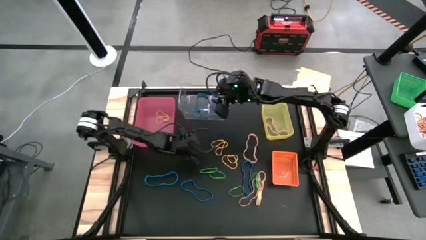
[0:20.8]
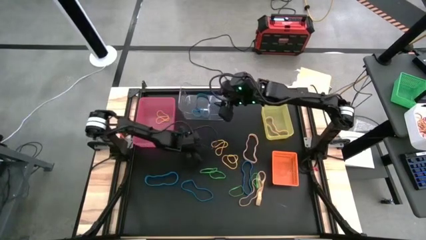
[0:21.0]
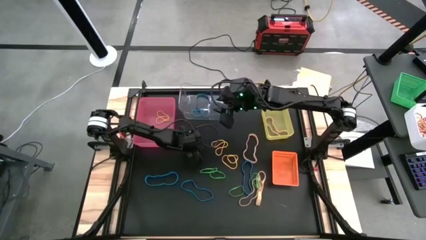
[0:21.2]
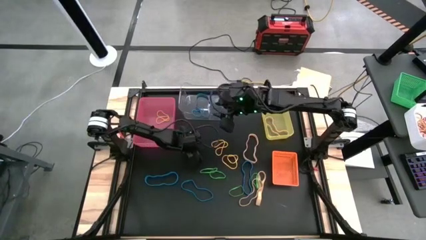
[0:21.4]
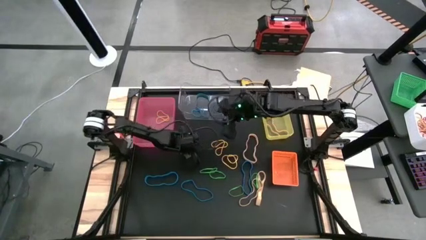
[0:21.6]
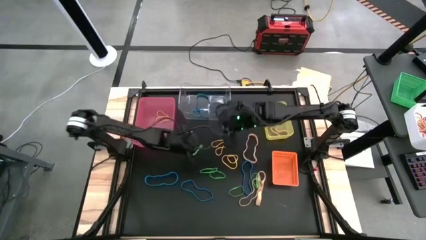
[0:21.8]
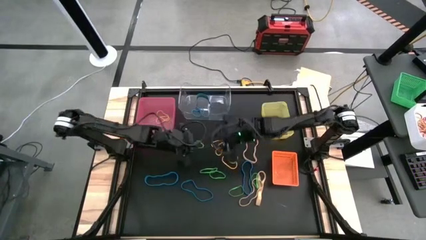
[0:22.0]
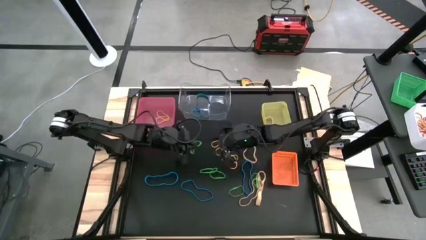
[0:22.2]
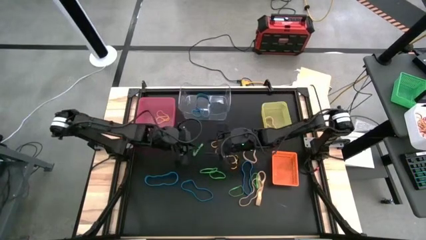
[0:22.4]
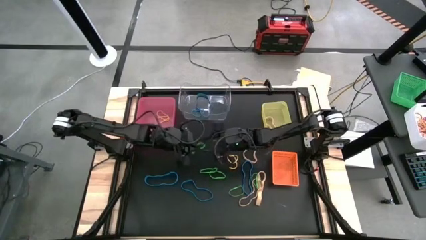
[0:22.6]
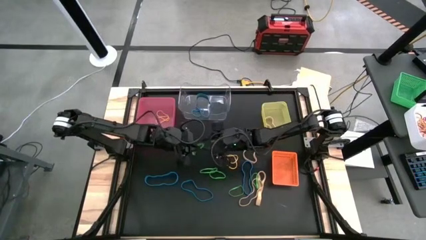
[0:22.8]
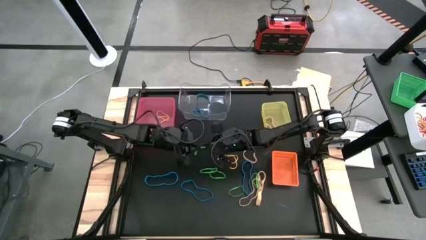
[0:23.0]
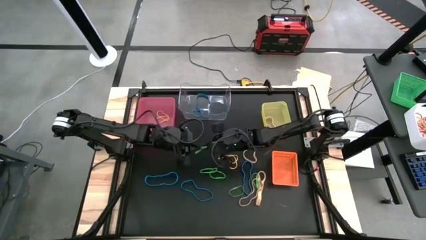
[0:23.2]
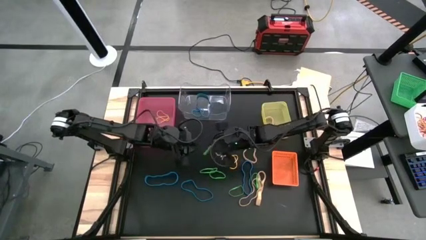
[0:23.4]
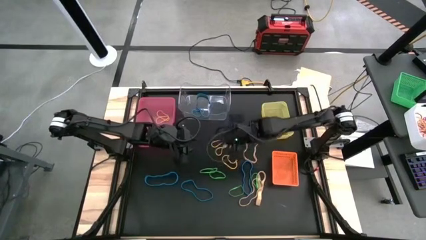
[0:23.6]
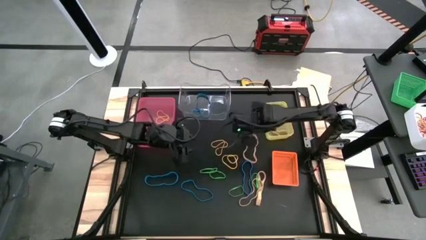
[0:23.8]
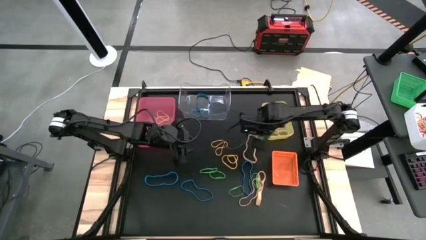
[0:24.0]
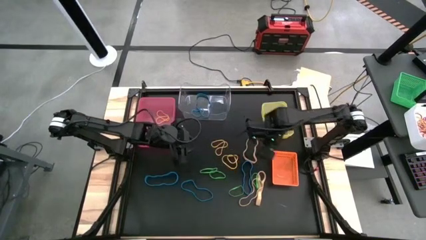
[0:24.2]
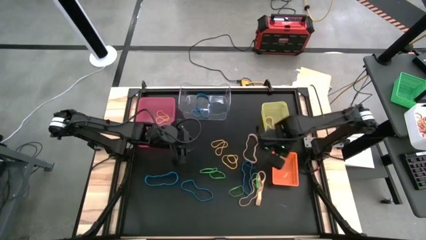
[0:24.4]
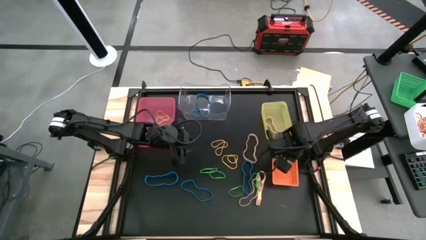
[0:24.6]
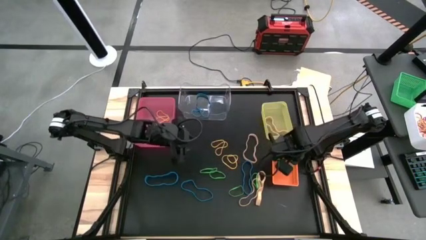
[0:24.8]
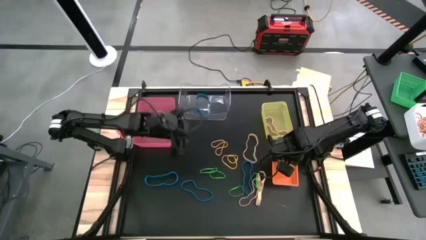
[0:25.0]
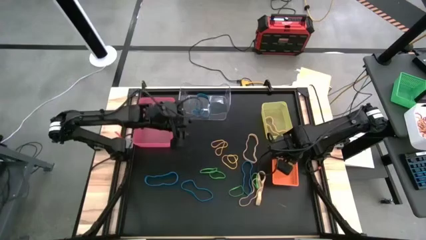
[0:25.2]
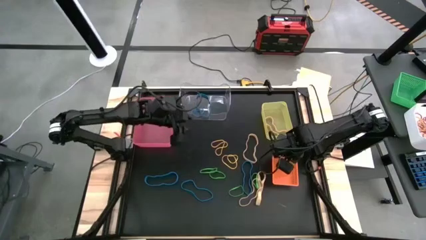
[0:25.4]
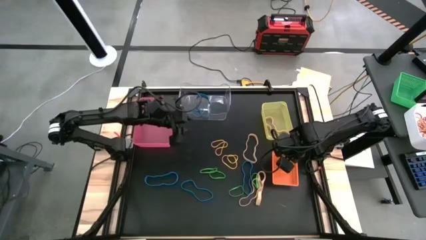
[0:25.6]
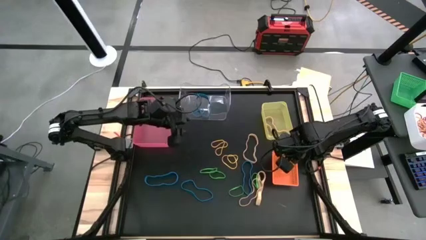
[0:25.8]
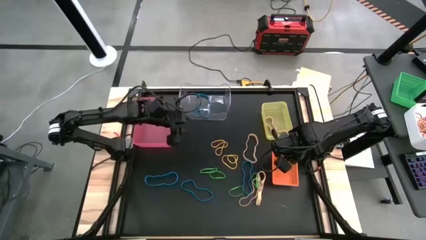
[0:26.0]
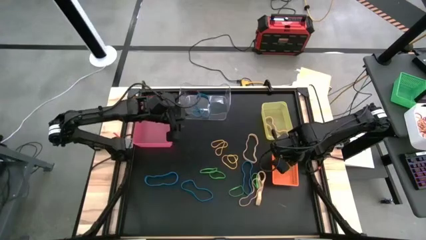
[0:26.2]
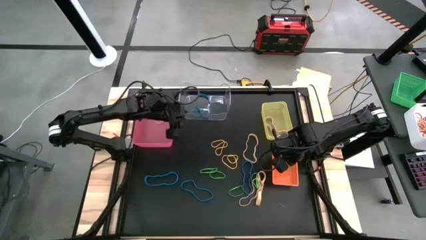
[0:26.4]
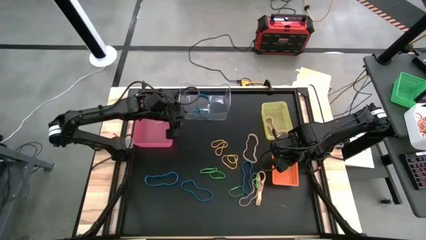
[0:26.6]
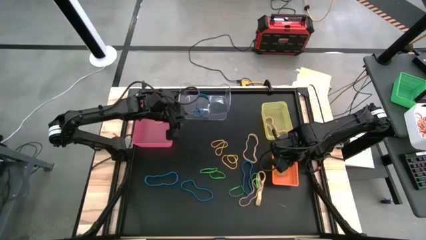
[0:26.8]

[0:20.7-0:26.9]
Task: Sort rubber bands into baskets
Put the green rubber band into the orange bin

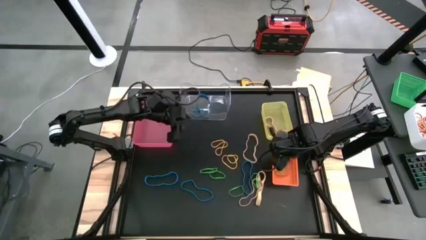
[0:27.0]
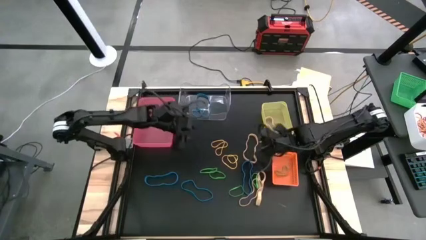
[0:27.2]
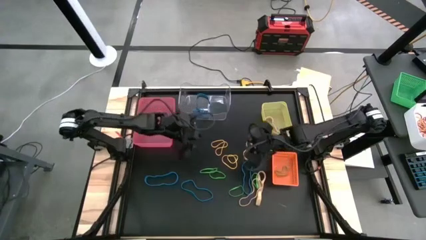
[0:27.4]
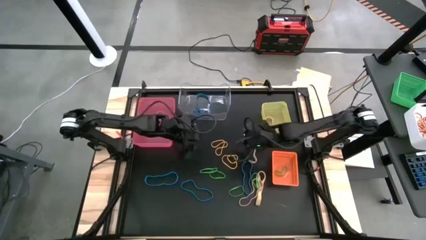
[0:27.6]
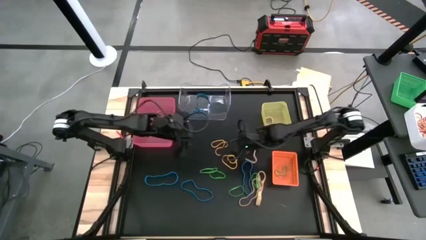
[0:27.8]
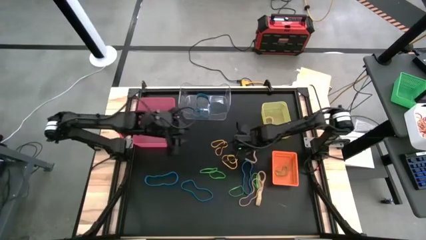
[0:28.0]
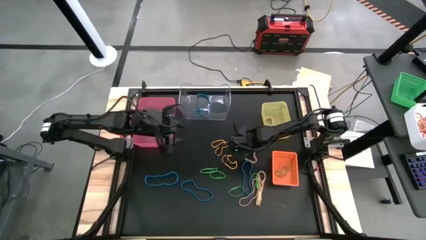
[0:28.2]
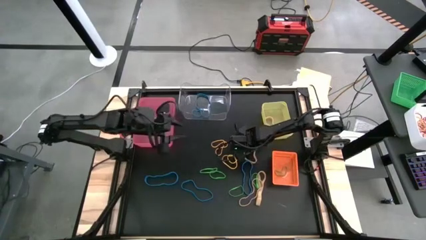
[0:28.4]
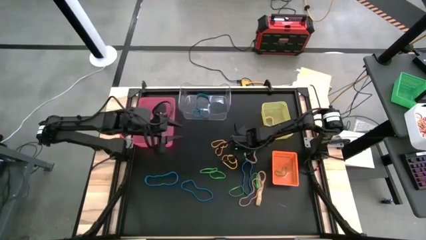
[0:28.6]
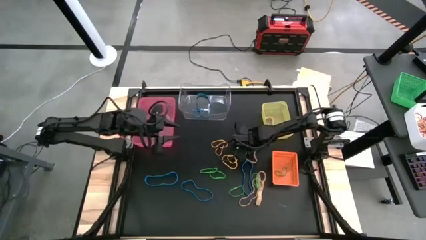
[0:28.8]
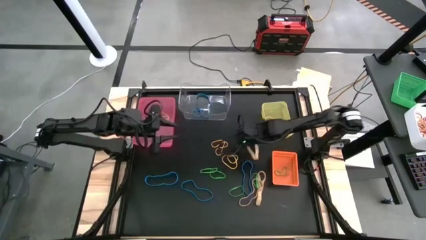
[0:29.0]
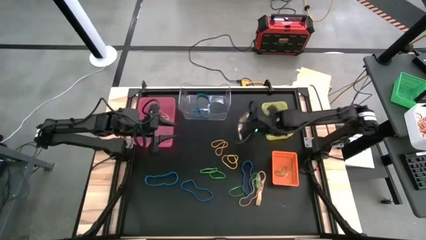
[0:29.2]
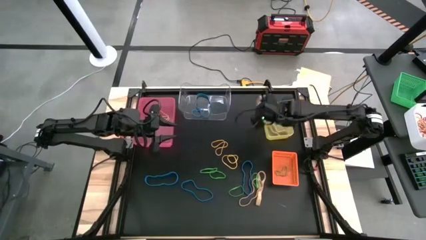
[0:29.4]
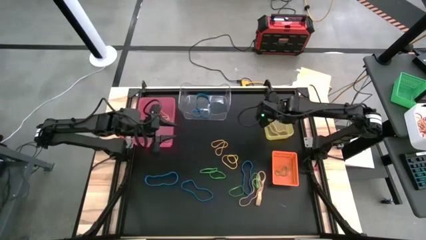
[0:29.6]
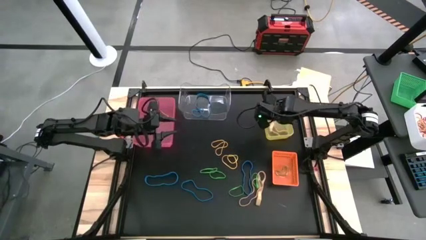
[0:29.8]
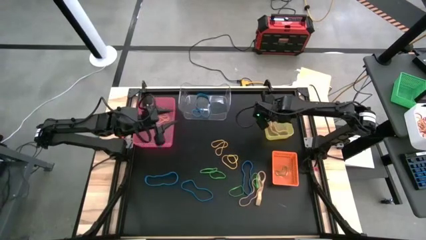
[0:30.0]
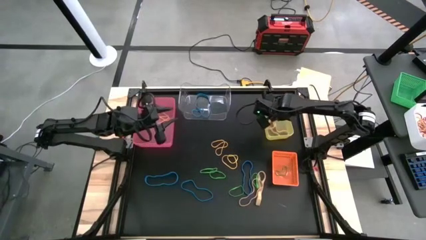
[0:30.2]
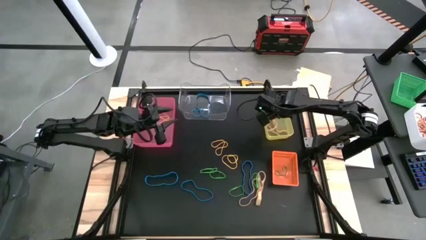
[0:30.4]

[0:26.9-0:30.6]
Put the light orange rubber band into the yellow bin

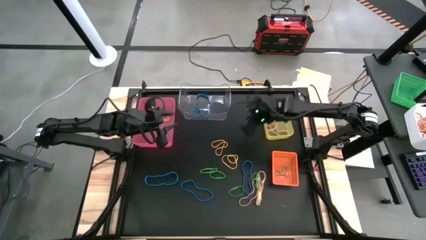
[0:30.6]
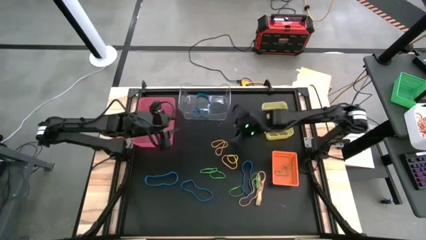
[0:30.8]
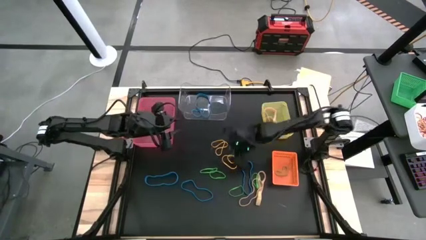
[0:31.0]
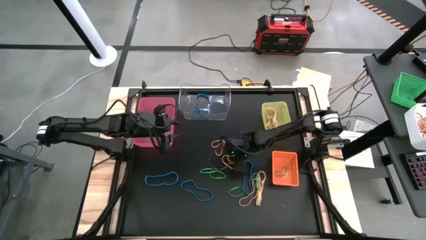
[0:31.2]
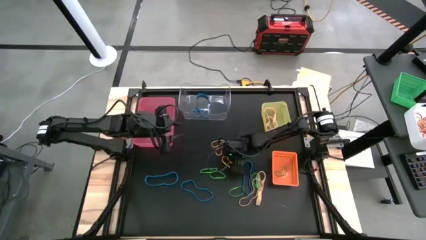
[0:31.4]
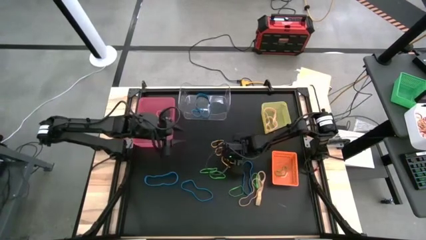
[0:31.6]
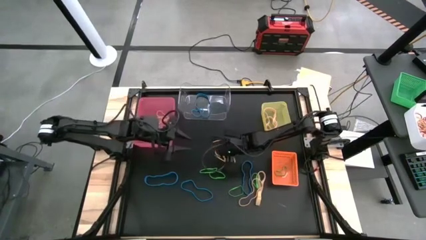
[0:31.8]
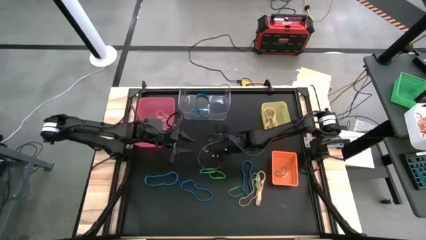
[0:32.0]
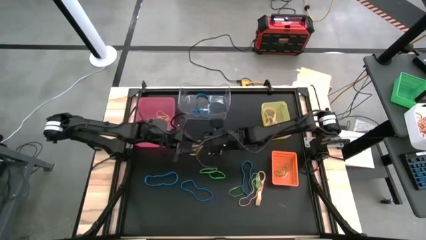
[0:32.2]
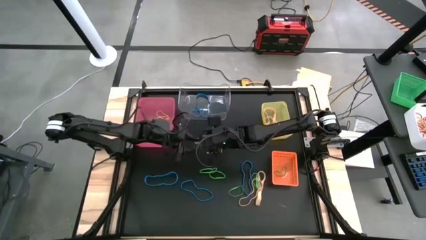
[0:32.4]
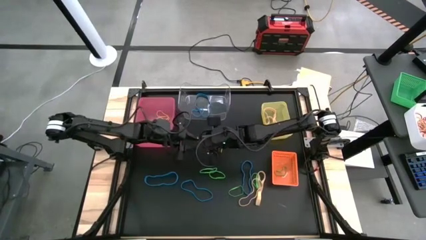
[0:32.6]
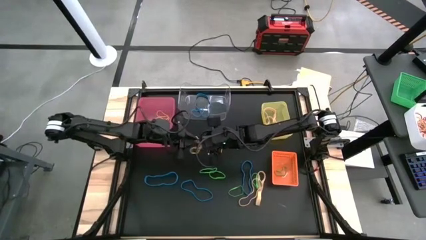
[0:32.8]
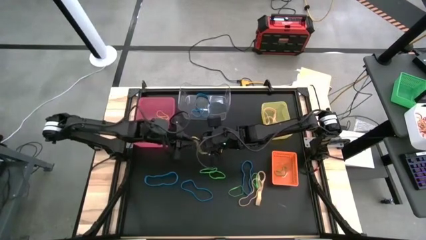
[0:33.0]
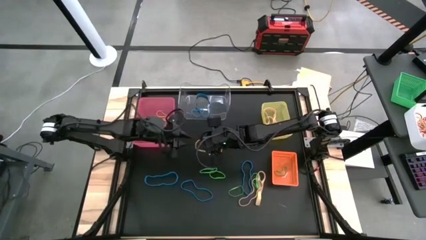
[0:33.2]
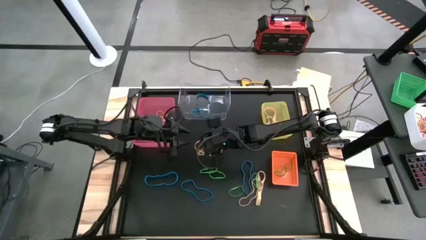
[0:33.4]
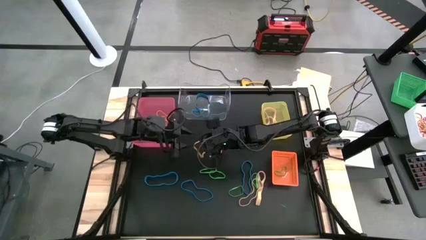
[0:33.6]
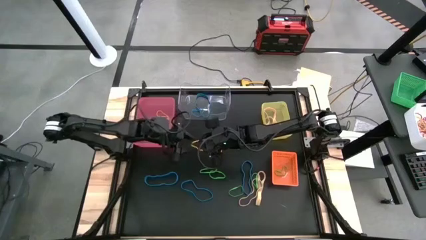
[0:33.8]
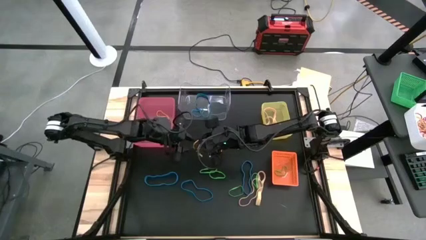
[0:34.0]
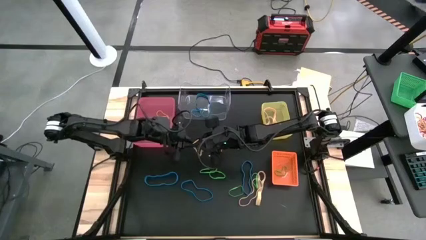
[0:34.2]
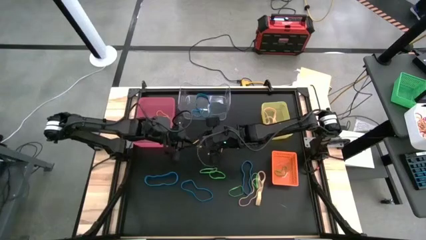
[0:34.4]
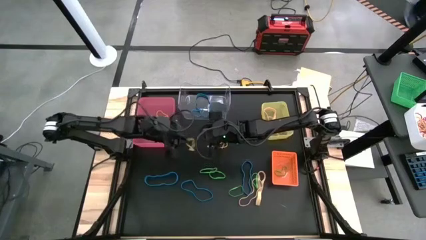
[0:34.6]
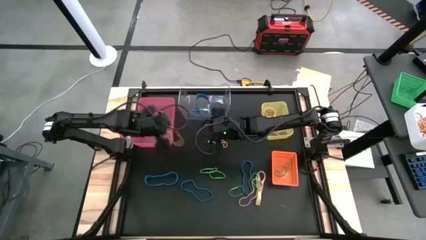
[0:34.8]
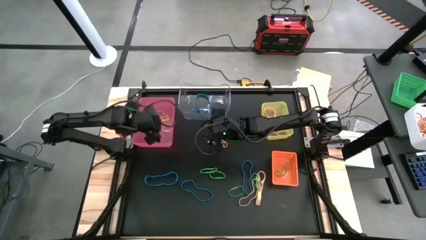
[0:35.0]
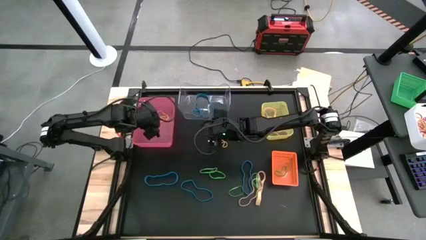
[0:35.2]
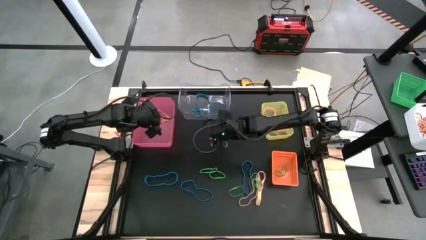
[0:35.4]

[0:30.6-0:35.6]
Put the yellow rubber band into the pink bin

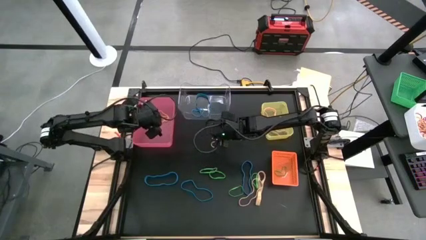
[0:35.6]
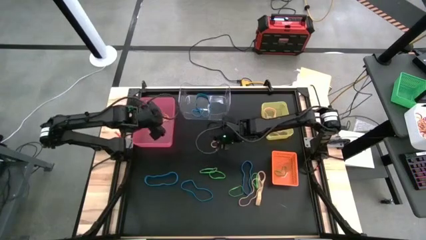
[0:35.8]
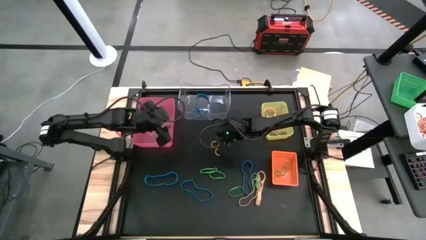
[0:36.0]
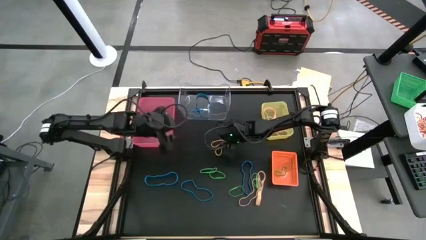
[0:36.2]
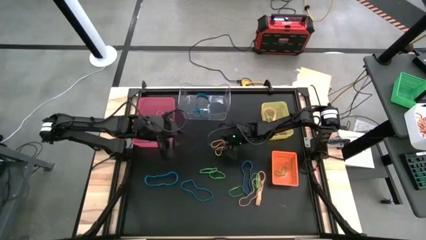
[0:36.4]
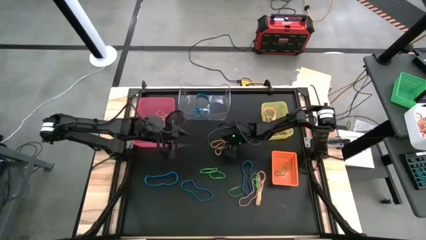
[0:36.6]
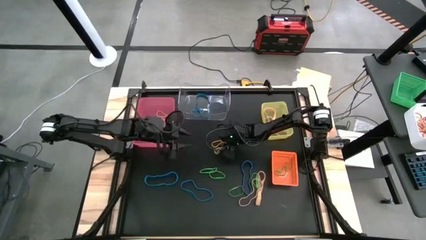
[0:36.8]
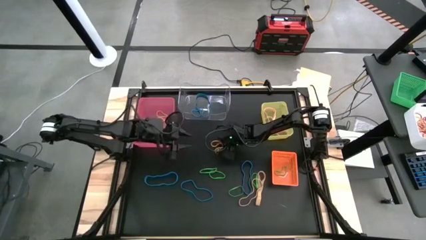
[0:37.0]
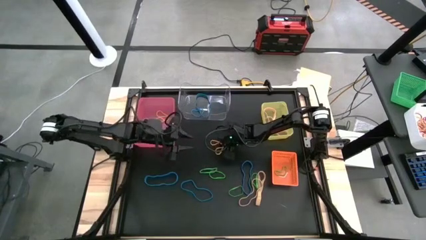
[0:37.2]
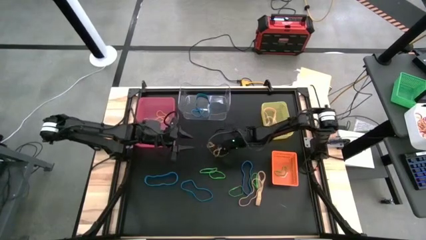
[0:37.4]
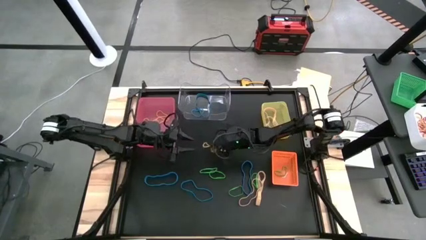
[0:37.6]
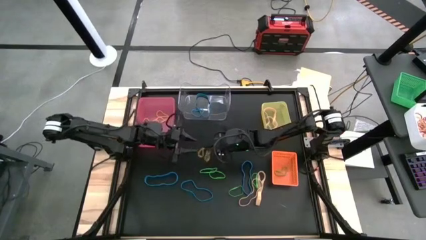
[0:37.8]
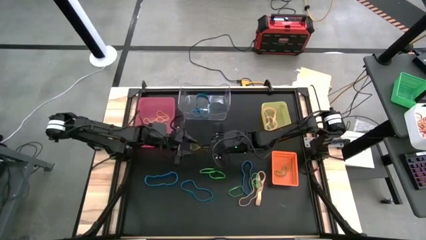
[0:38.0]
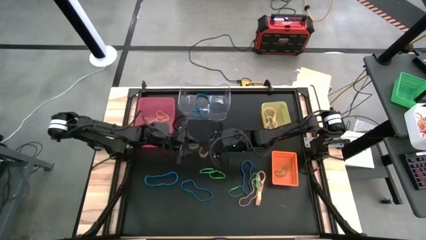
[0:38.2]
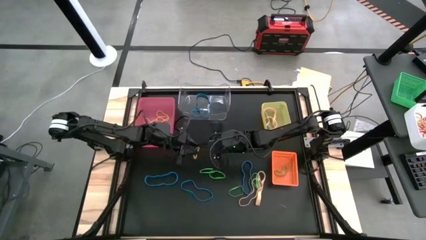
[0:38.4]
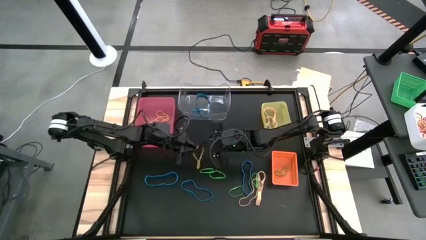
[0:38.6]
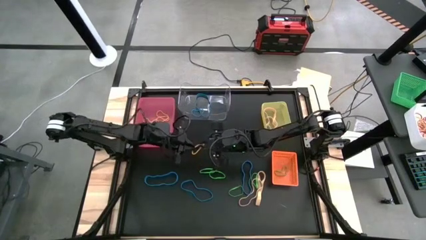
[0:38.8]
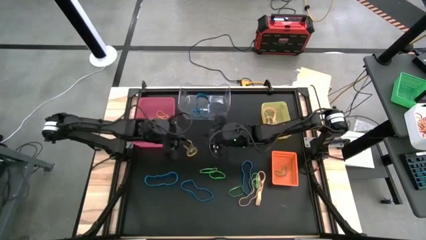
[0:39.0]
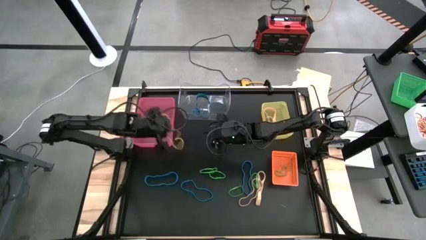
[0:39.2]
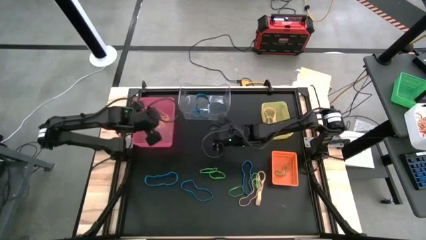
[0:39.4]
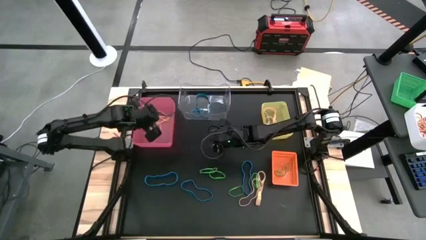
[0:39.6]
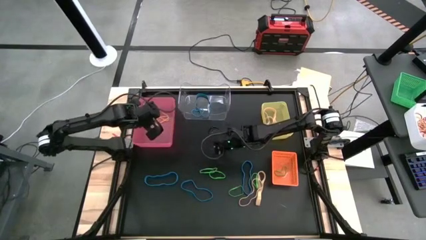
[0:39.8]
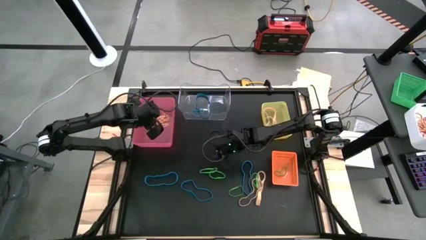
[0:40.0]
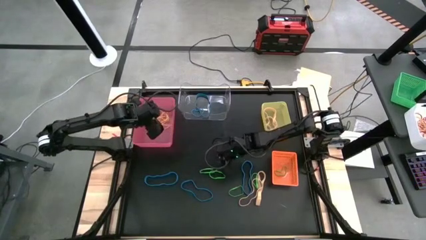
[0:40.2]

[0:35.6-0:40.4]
Put the yellow rubber band into the pink bin
